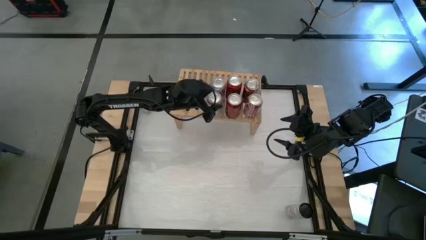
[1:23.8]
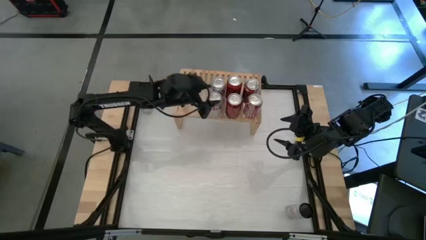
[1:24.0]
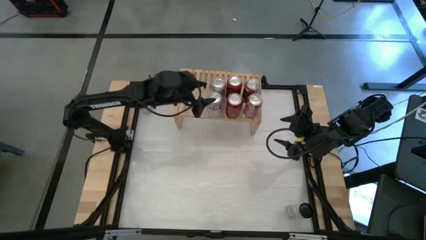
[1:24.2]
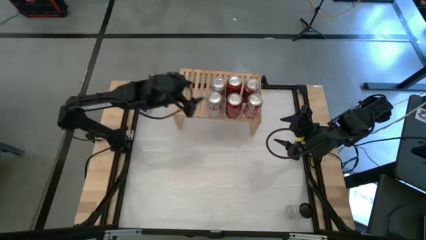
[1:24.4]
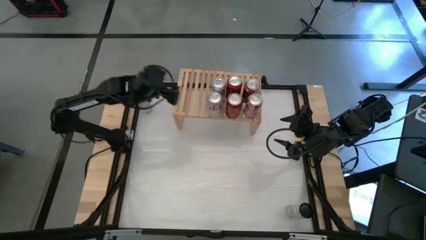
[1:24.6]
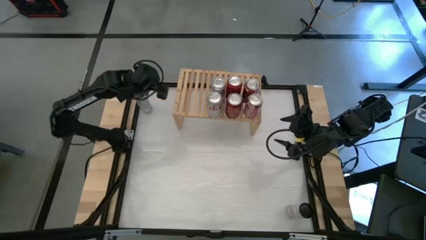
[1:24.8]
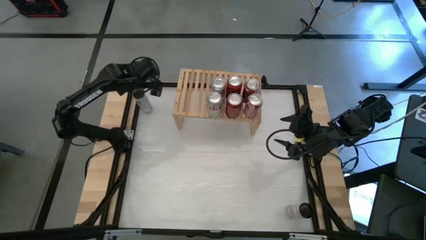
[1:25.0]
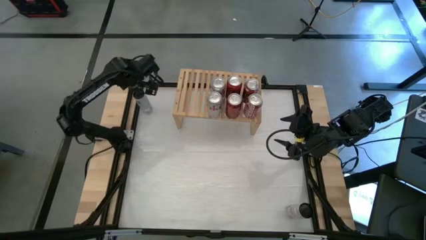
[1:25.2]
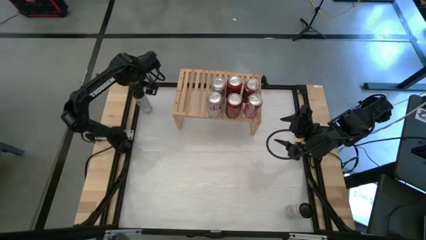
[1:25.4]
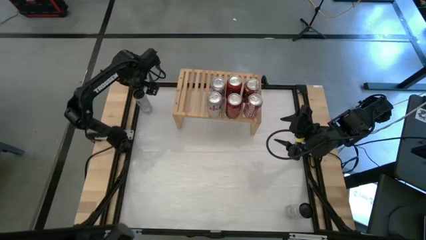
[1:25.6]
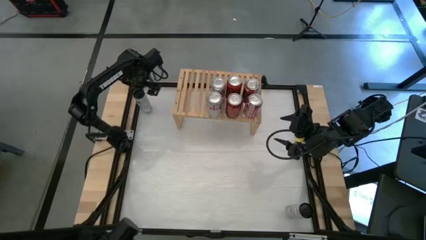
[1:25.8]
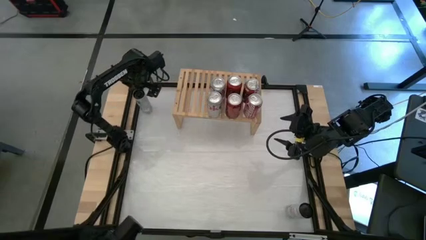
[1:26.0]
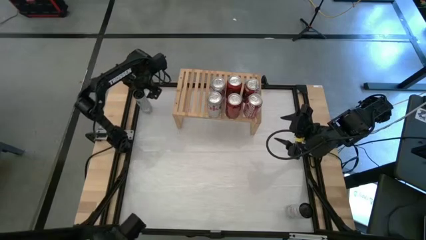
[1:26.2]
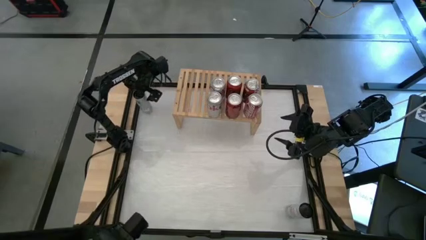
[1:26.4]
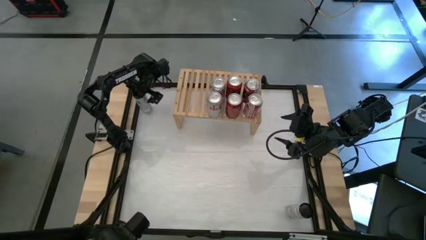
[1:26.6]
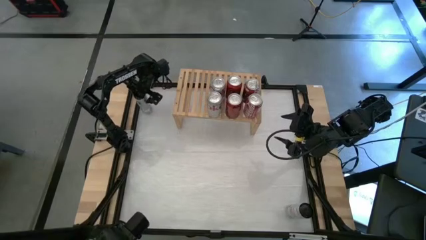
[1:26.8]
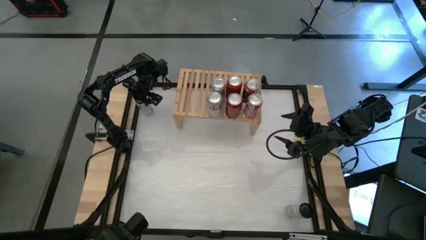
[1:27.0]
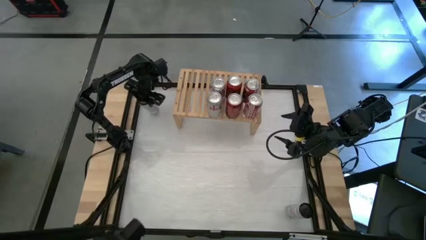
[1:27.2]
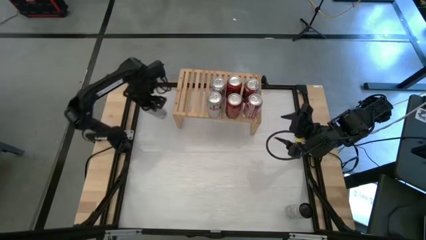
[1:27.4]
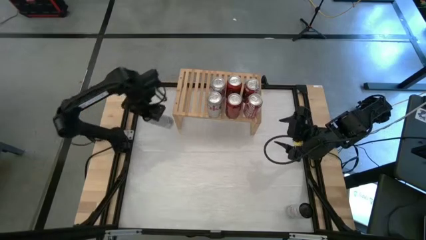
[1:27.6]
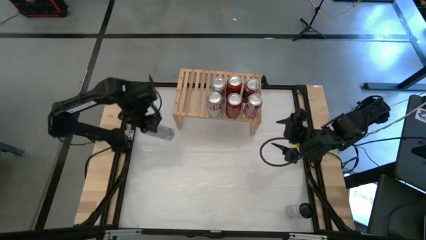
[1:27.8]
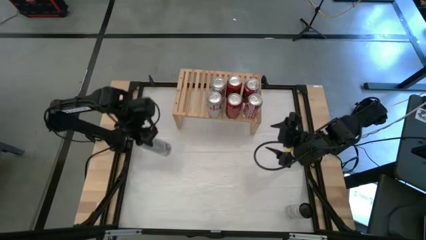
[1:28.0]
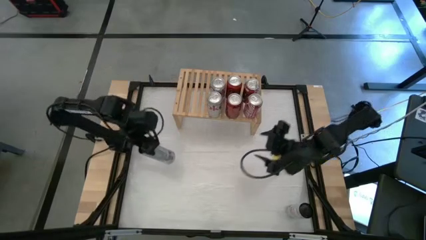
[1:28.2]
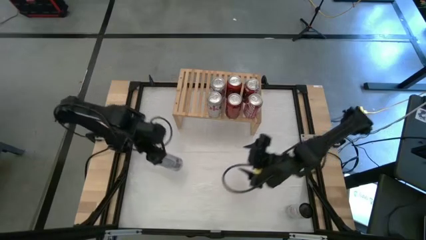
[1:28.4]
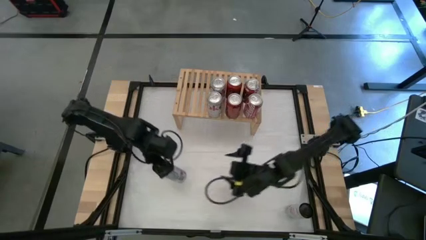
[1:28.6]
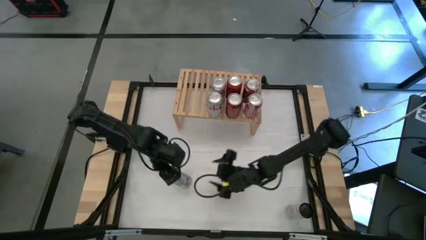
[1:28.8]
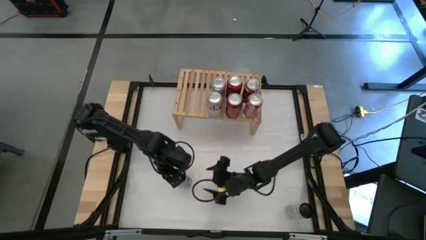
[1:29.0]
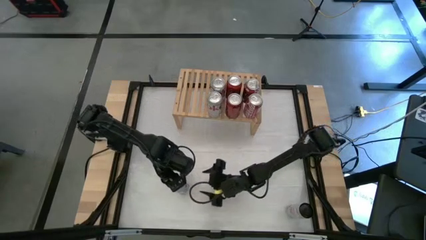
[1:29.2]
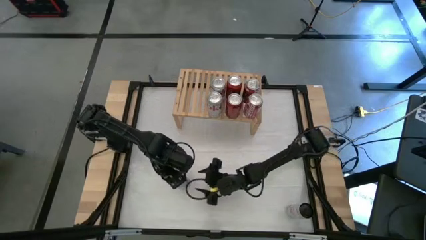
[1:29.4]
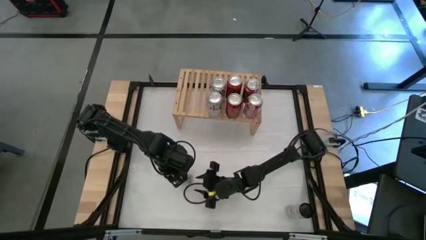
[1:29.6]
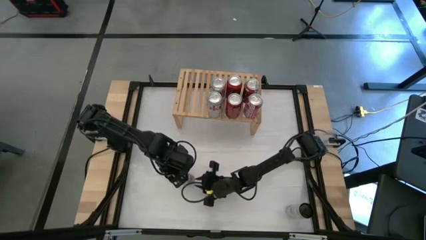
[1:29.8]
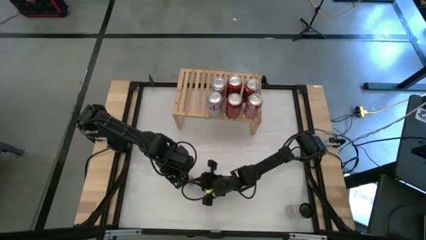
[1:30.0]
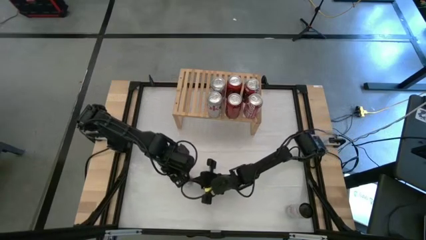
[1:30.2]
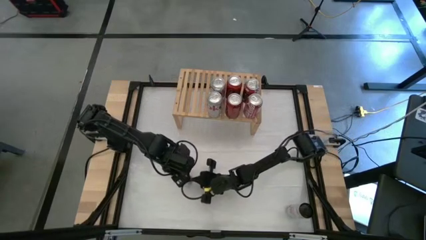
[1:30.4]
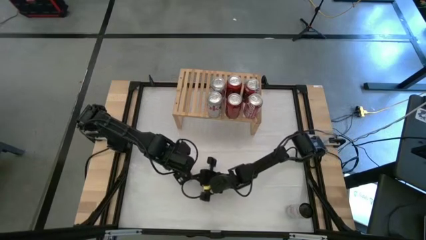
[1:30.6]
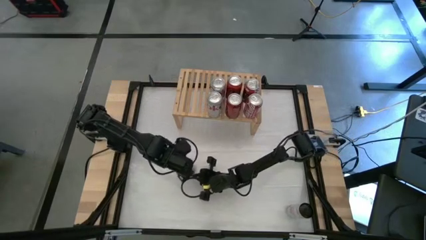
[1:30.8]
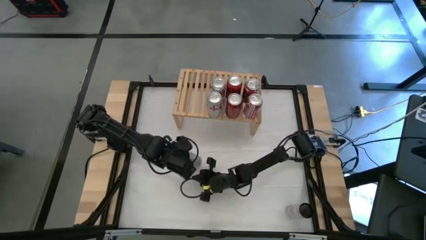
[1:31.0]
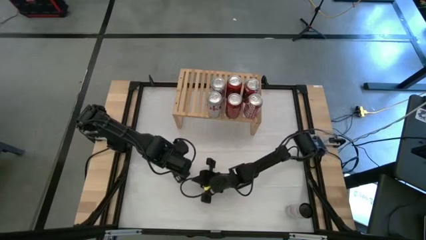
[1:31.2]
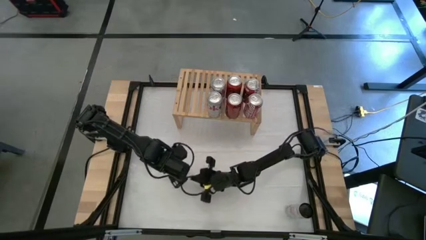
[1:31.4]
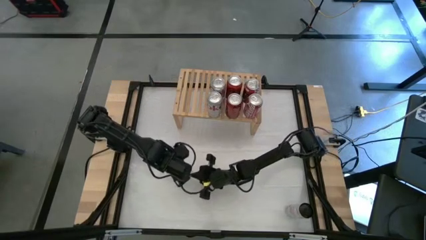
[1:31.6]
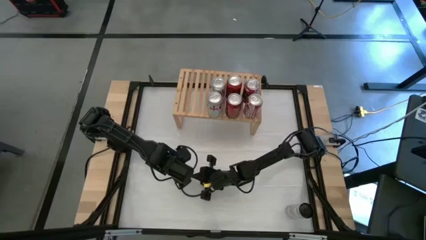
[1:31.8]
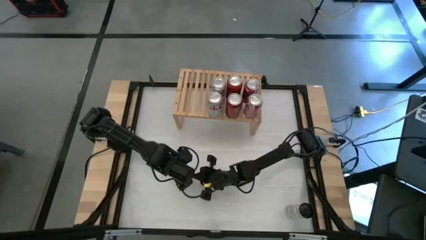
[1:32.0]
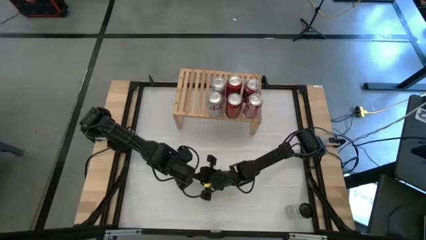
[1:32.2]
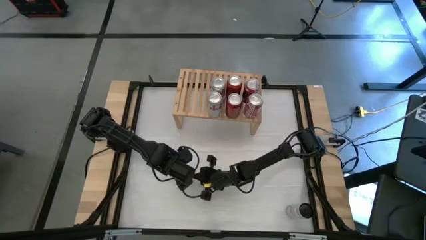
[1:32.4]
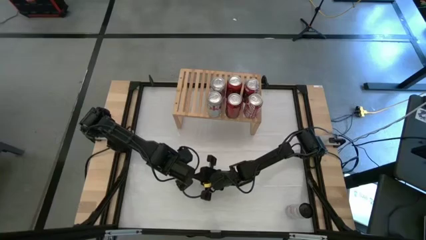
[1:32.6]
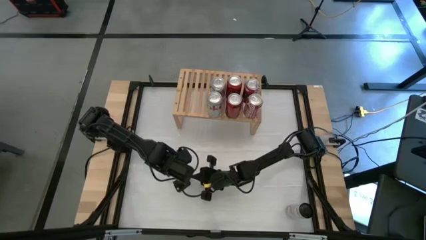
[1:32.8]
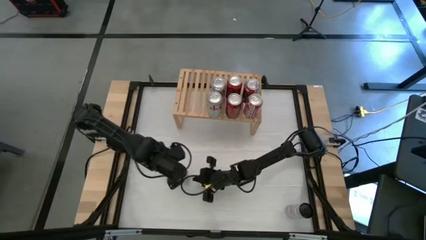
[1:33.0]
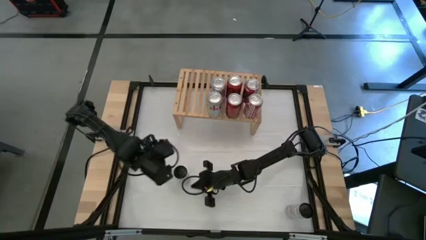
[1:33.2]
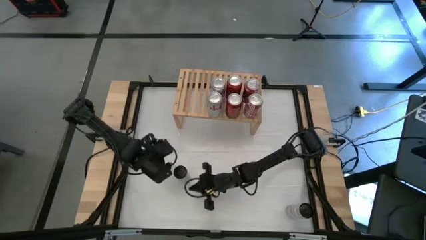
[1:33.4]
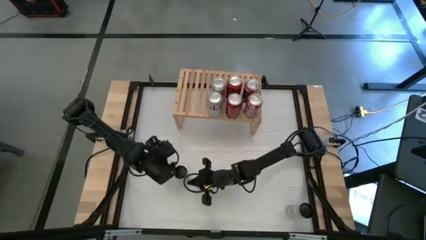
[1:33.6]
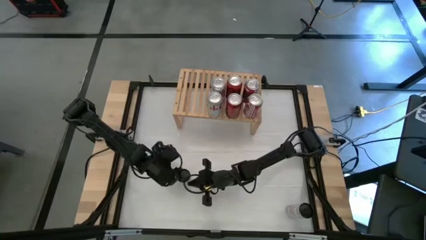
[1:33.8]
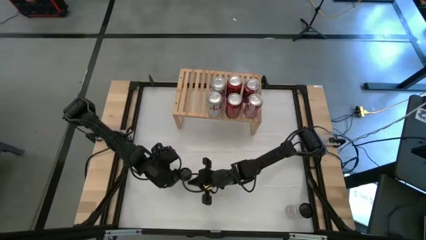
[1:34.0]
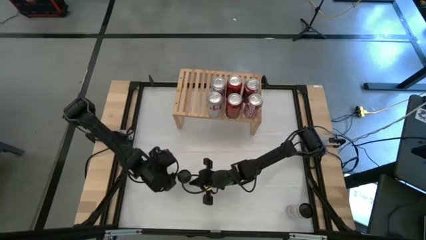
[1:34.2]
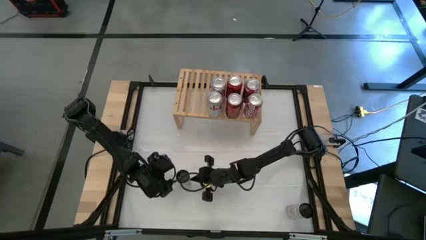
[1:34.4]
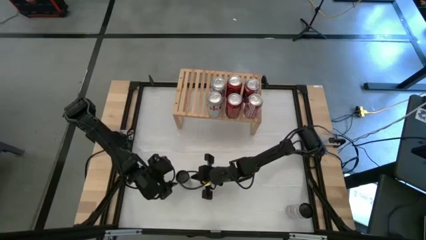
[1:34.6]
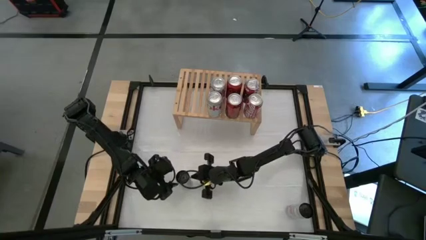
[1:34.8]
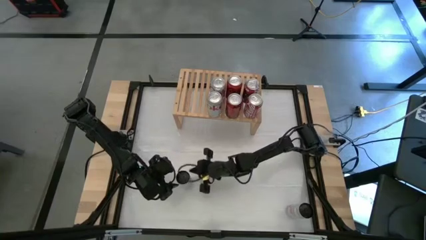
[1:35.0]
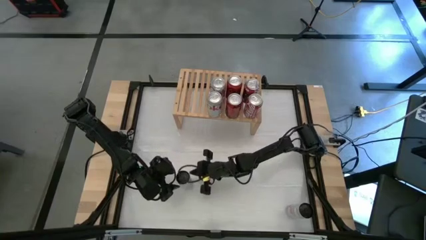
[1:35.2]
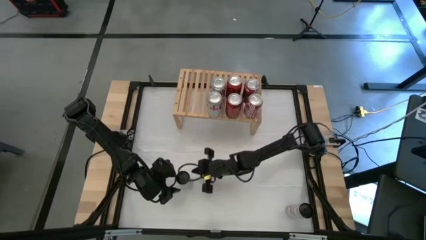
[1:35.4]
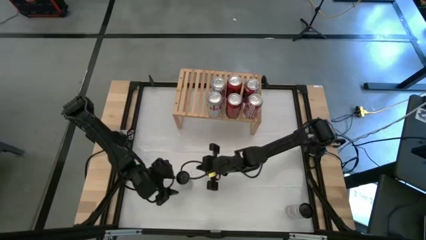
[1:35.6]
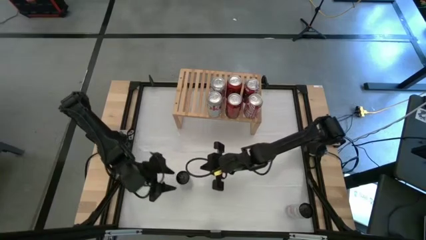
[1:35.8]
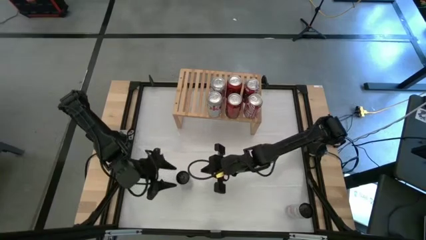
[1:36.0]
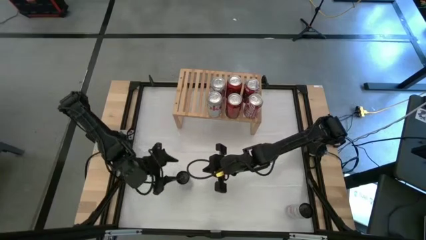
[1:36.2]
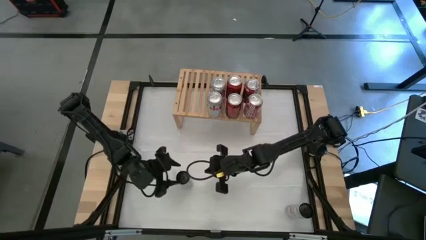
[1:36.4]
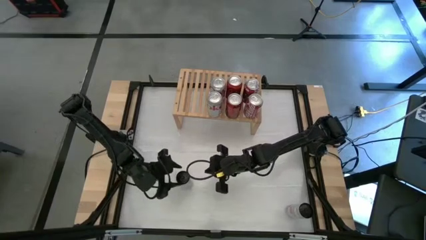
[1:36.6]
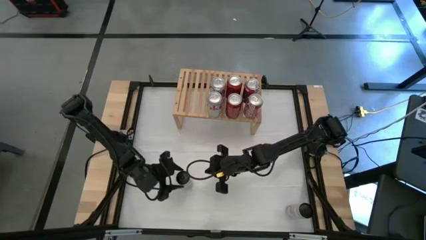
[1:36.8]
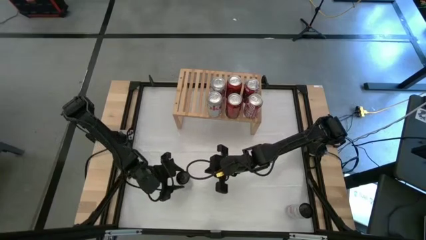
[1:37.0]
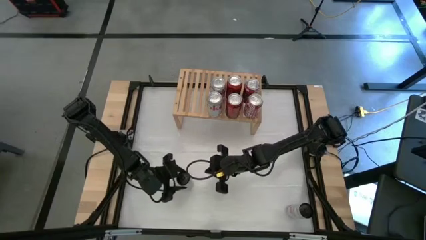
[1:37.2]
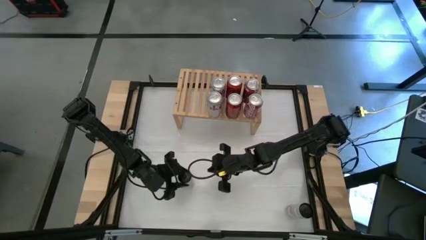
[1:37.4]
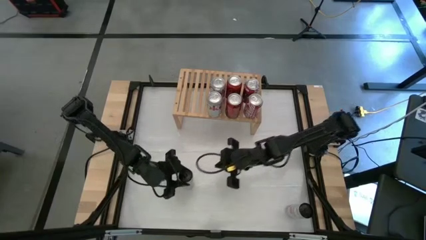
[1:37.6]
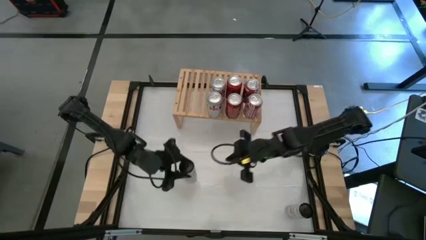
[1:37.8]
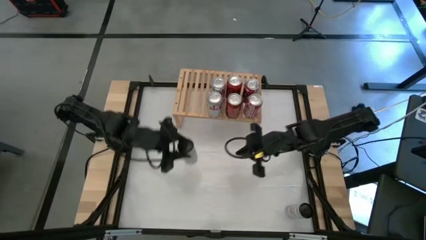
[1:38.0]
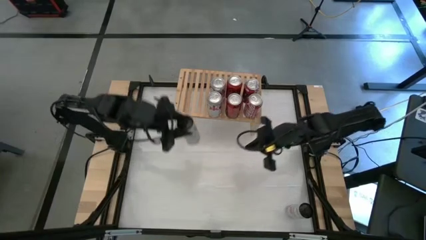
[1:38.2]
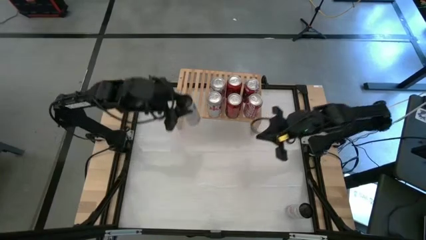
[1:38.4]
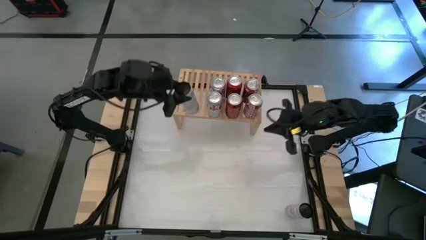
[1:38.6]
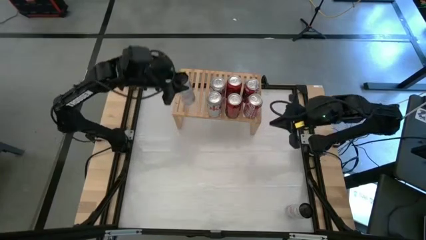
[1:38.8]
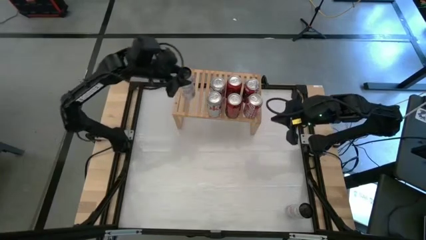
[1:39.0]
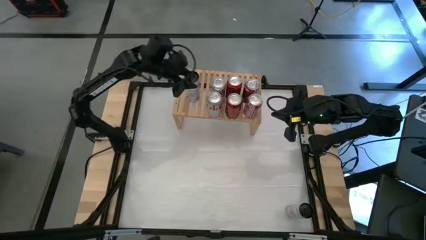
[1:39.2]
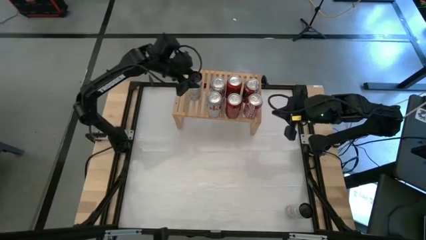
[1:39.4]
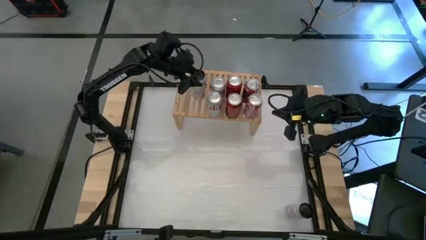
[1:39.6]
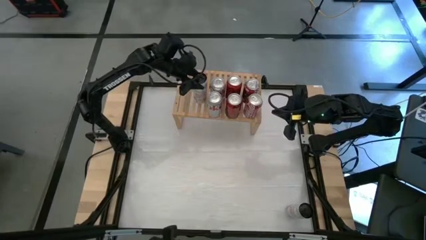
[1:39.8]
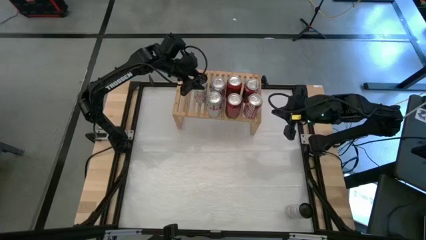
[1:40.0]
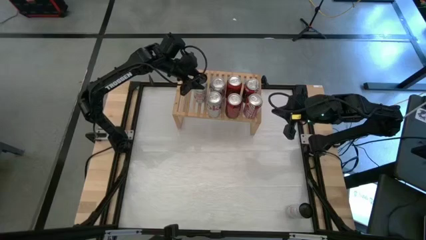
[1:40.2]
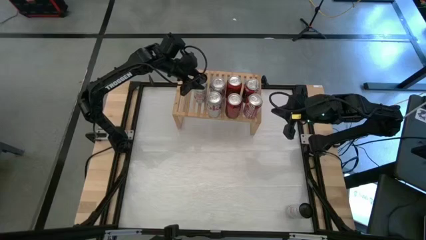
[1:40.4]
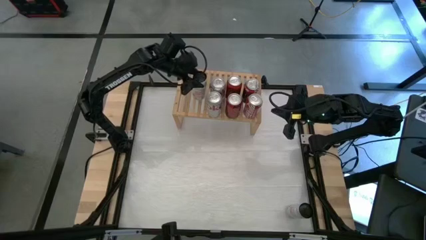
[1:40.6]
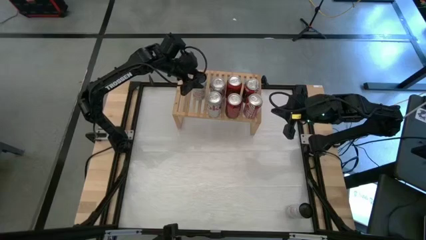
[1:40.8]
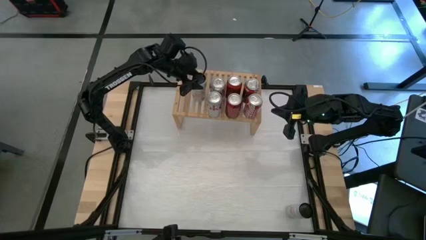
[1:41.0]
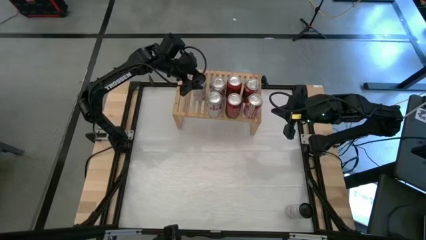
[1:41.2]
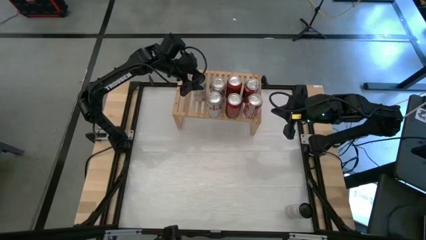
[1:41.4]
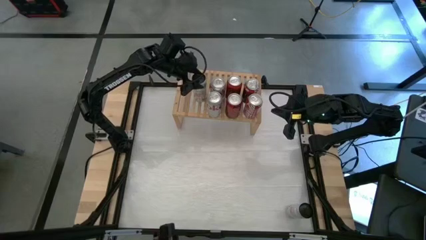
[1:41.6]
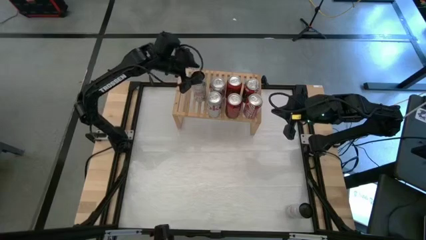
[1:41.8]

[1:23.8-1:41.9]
Task: Place canned beverage on shelf
Put the top white and pink soda can on the shelf
